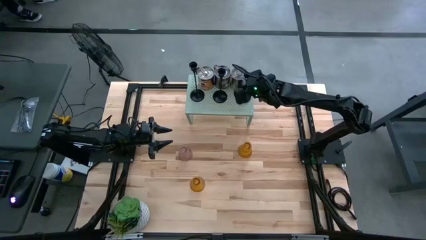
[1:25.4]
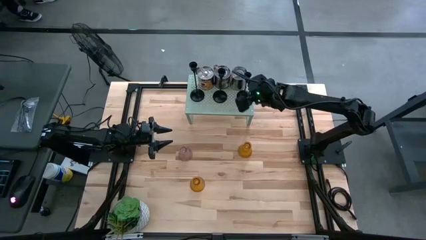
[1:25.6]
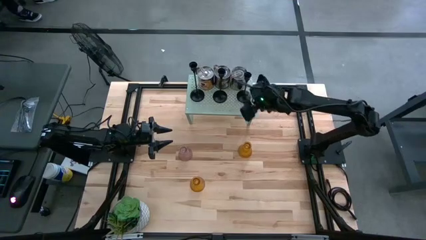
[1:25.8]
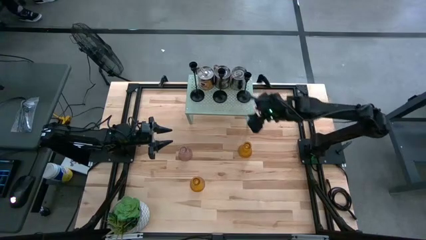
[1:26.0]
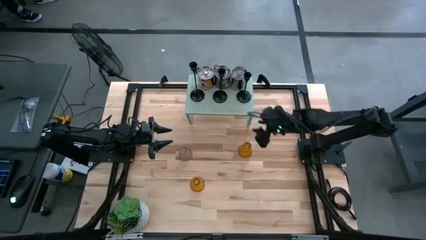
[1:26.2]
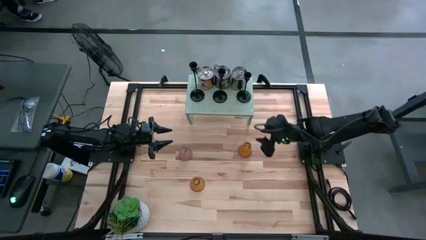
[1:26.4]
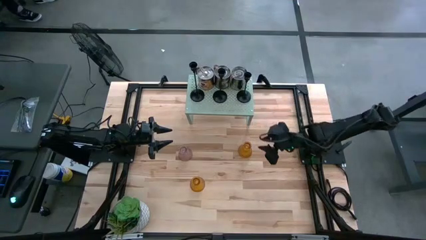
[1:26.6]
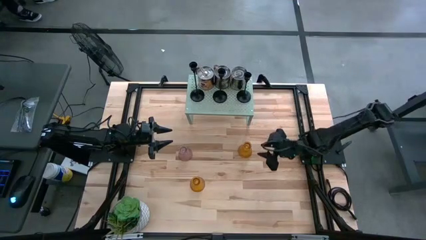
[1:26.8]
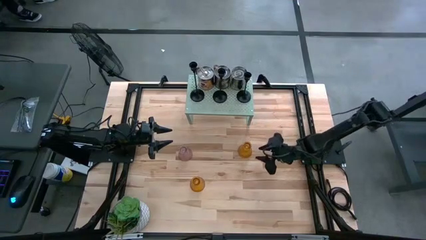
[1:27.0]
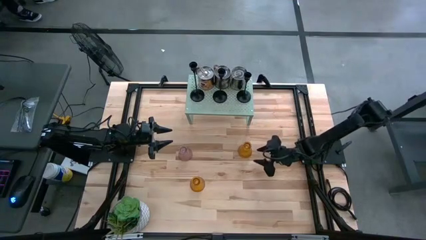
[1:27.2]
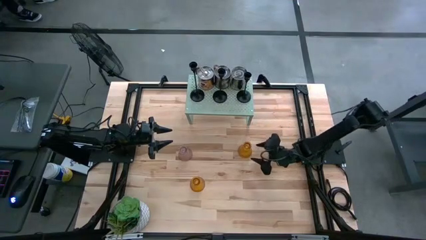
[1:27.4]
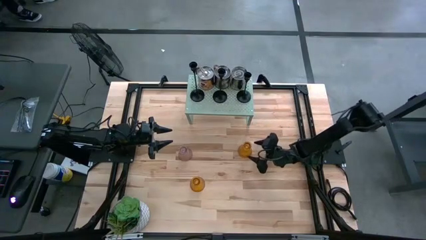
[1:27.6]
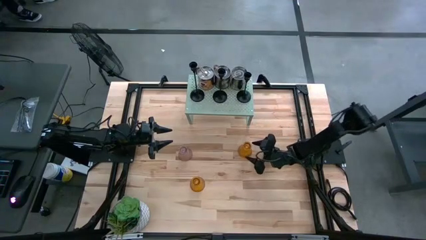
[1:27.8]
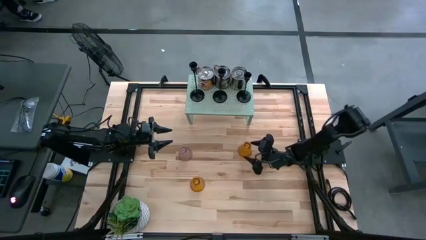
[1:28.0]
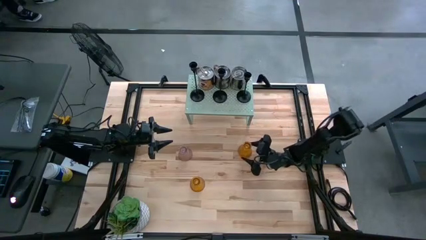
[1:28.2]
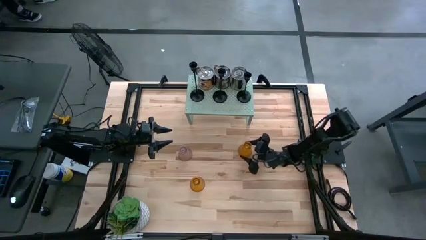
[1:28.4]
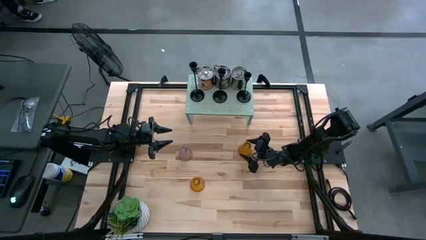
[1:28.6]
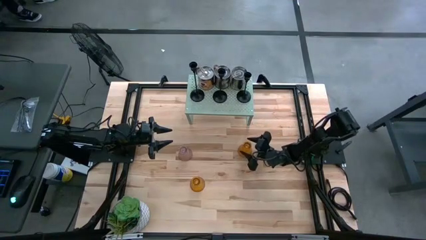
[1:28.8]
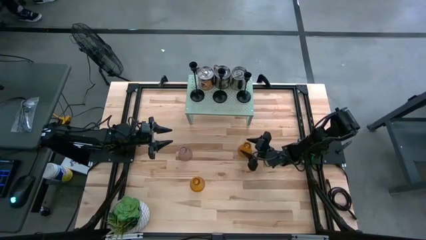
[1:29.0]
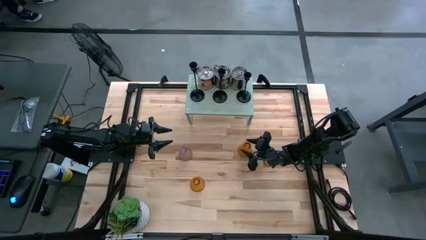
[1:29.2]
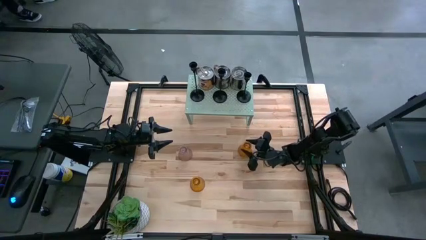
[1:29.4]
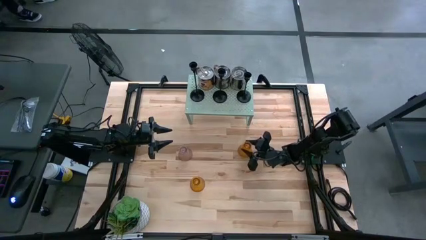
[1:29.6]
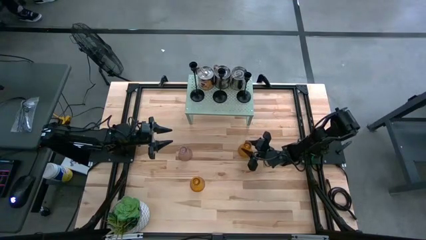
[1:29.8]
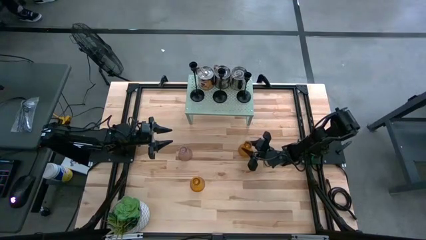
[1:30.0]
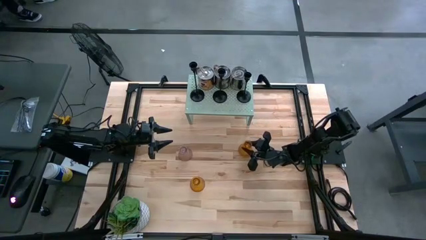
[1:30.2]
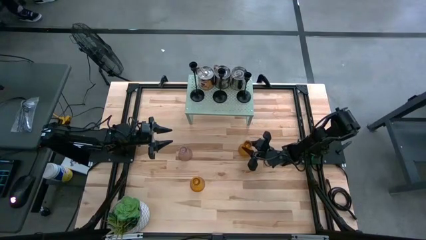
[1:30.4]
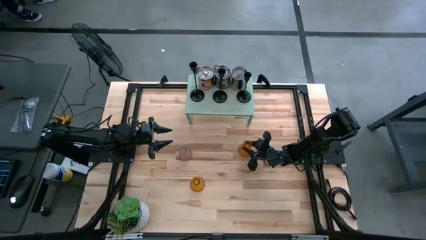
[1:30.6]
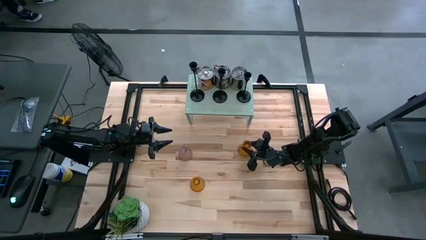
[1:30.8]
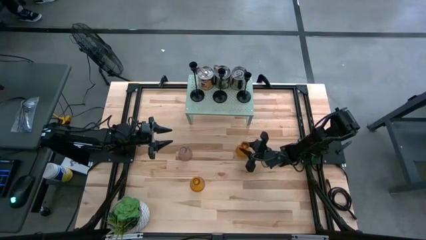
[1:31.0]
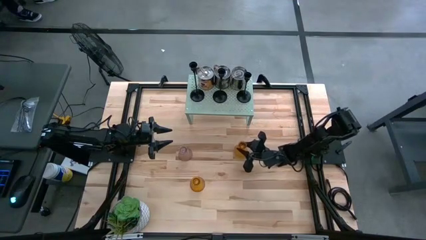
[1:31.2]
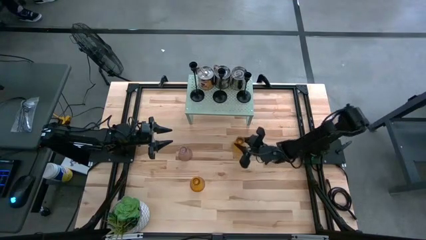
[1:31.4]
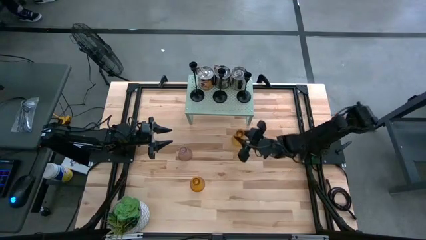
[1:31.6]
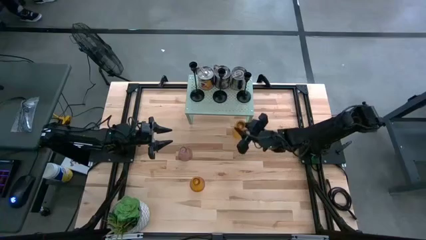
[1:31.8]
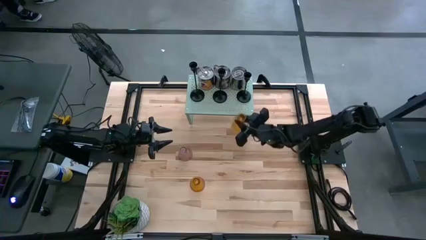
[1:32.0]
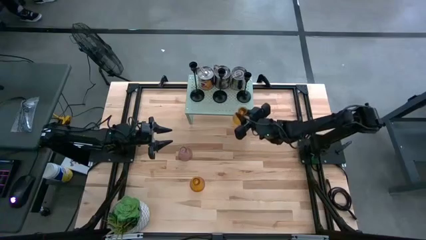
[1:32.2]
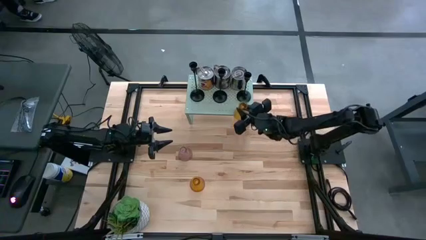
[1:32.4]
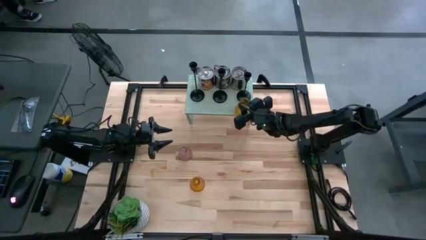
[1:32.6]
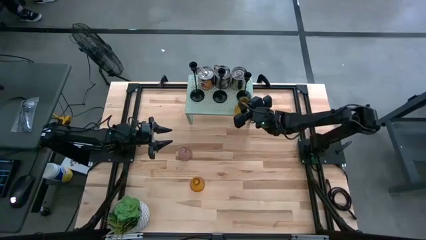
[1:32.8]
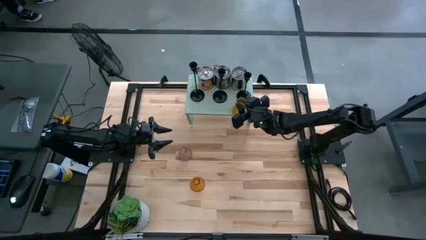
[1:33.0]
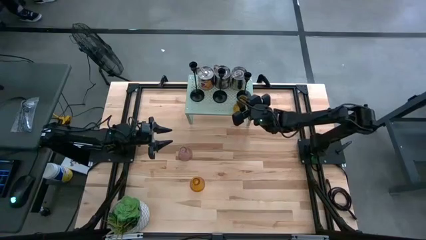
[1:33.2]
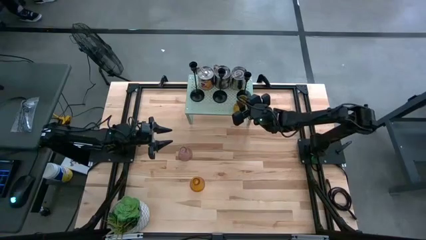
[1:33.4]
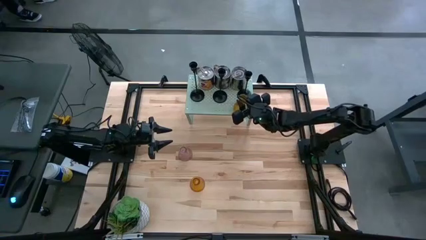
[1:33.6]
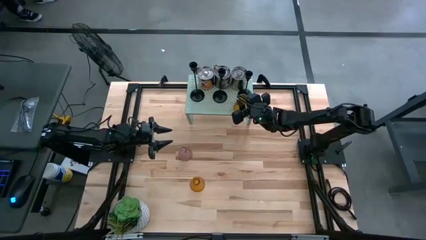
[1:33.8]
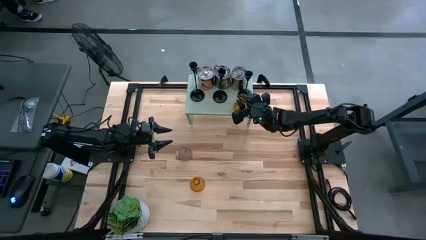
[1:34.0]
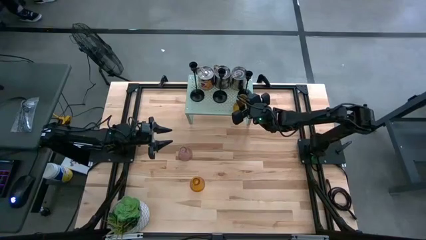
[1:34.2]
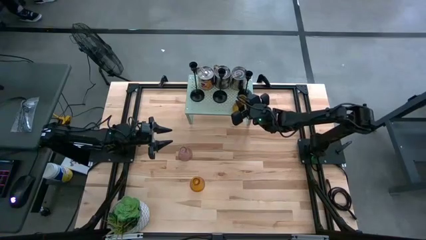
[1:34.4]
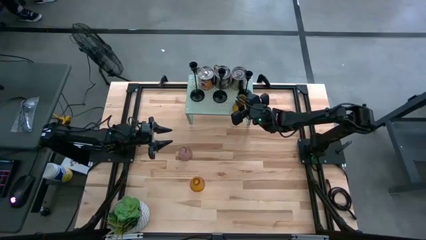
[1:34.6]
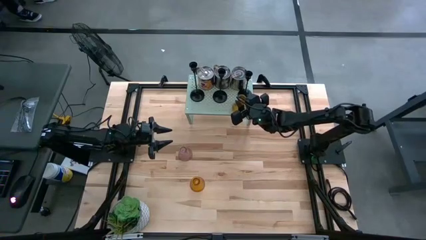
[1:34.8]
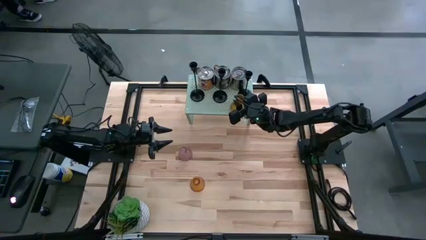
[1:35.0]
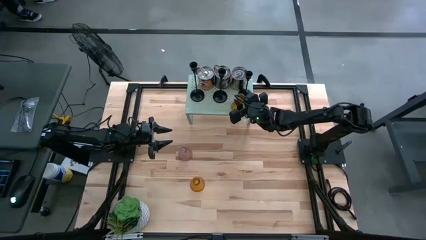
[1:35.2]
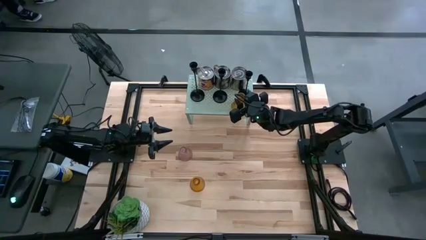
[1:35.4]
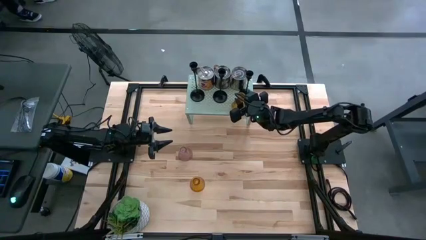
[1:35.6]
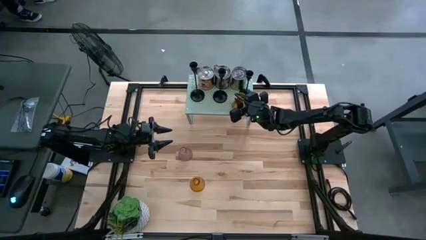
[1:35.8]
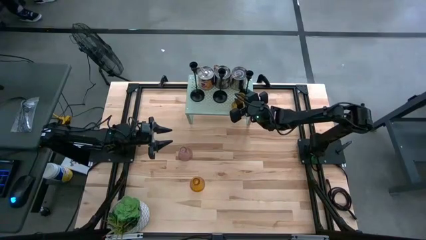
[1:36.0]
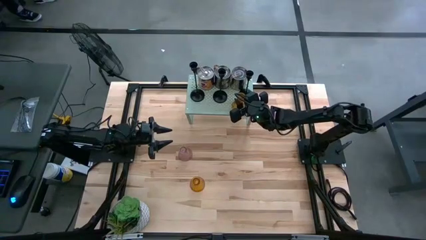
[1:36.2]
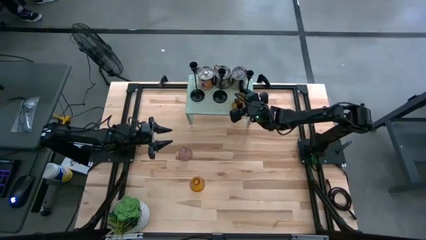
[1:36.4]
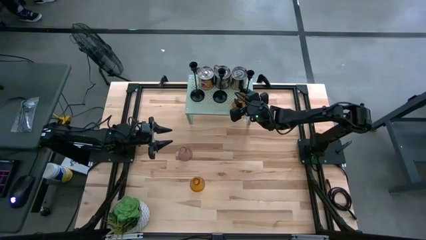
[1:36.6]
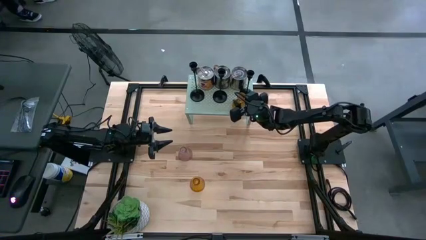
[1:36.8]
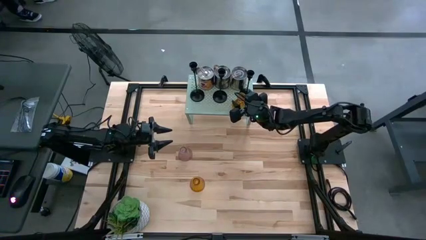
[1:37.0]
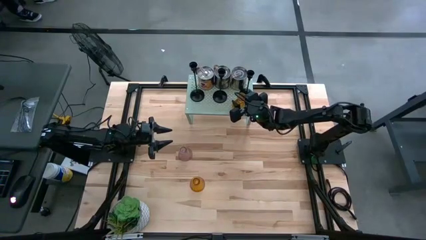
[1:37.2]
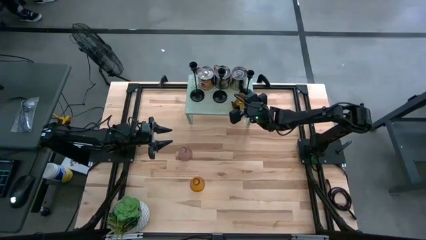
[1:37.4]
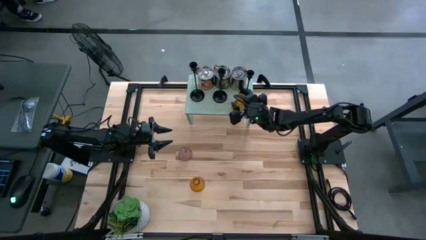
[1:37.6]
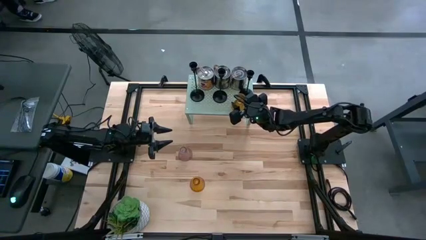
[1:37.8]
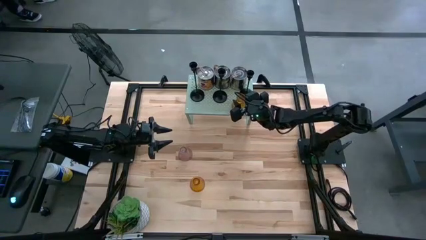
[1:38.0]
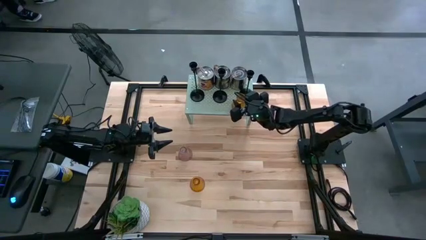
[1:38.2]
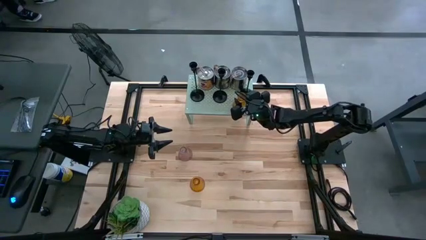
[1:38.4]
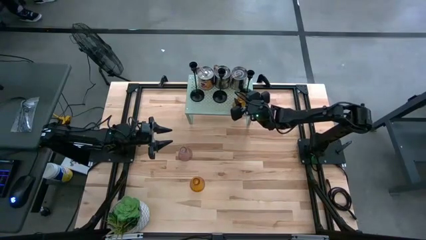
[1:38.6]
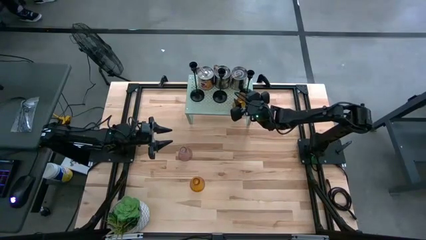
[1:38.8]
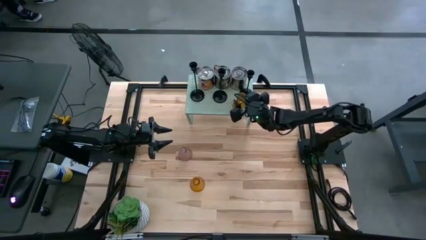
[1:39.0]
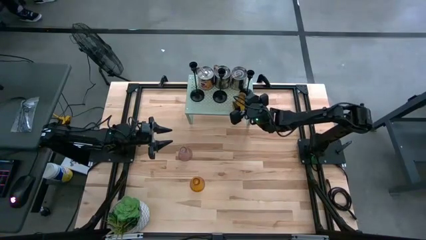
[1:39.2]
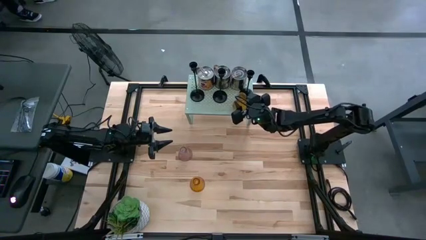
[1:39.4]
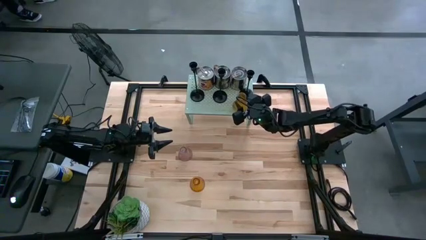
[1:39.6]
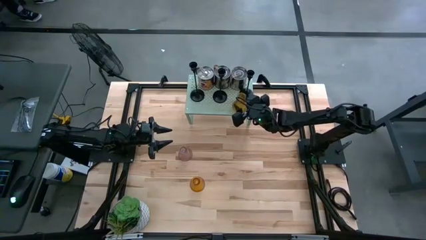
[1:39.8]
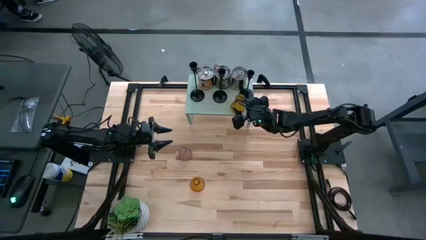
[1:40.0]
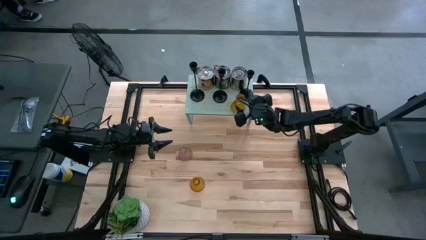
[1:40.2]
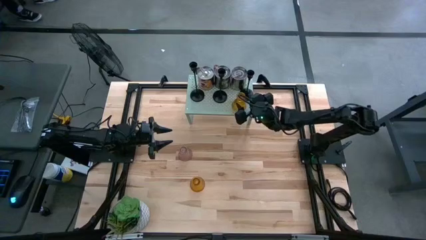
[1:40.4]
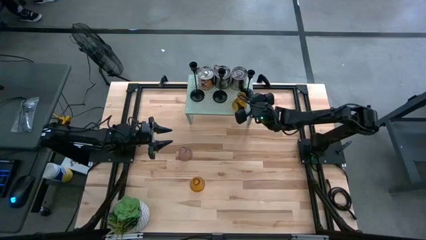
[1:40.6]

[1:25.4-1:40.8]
Task: Pick & Place candle stick holders
Put the right yellow candle holder on the shelf
